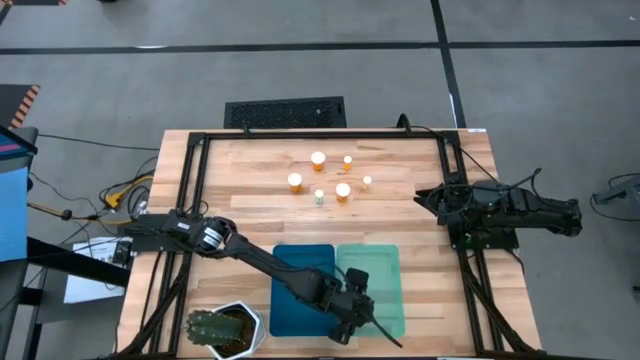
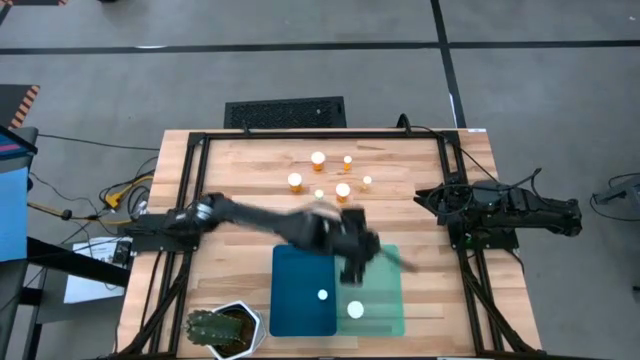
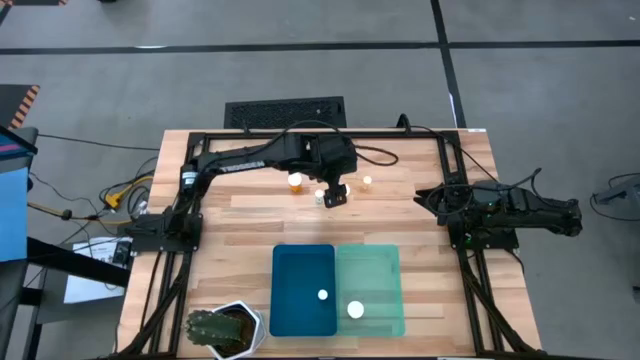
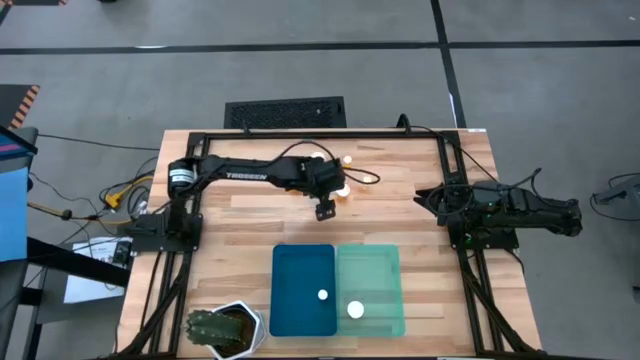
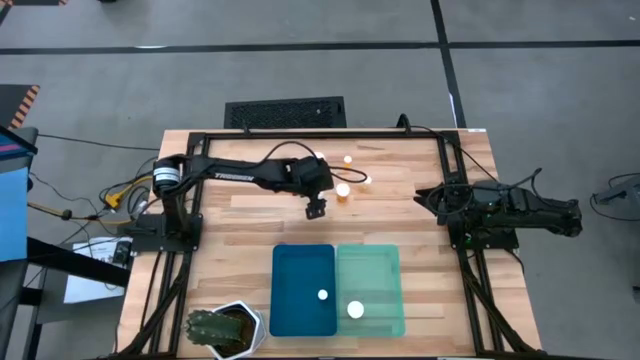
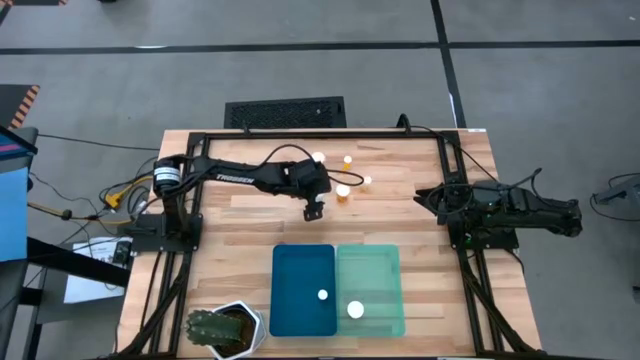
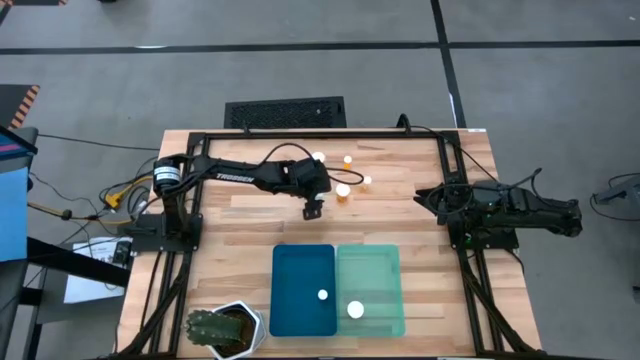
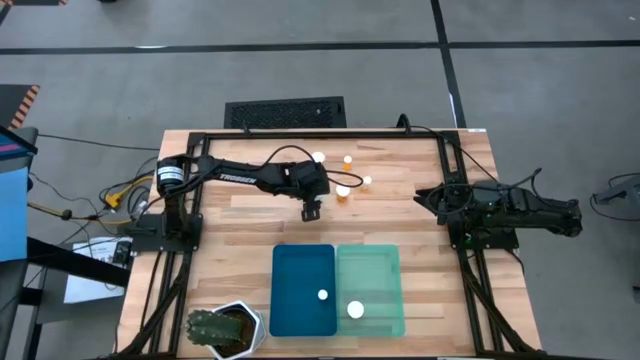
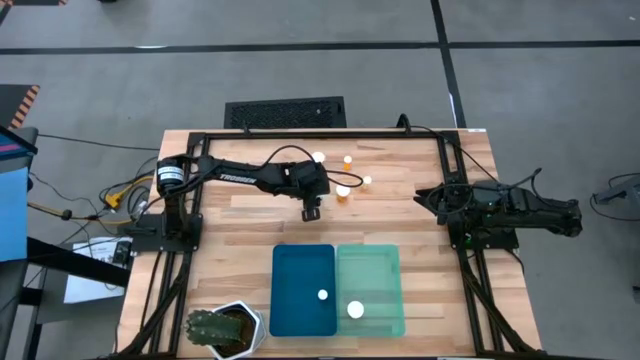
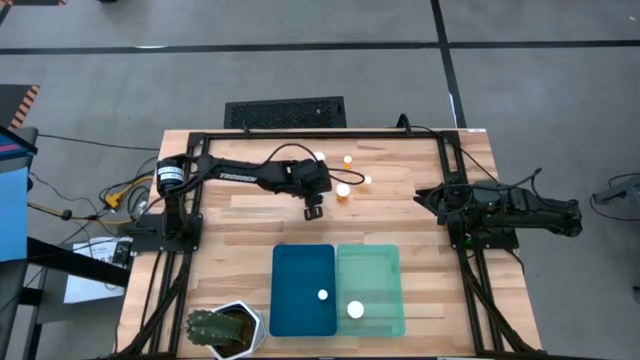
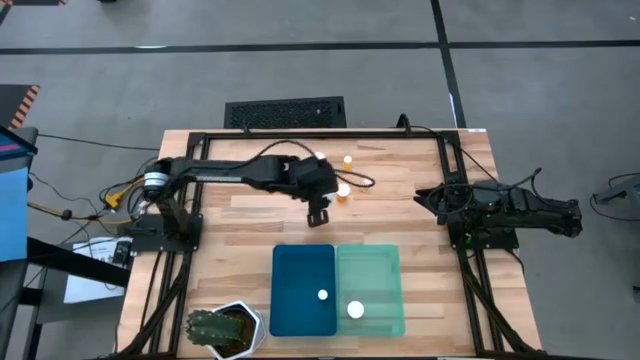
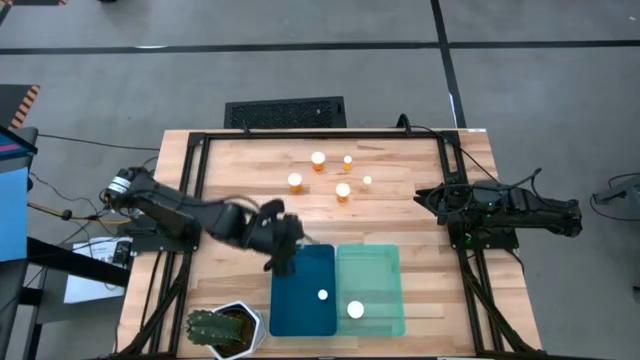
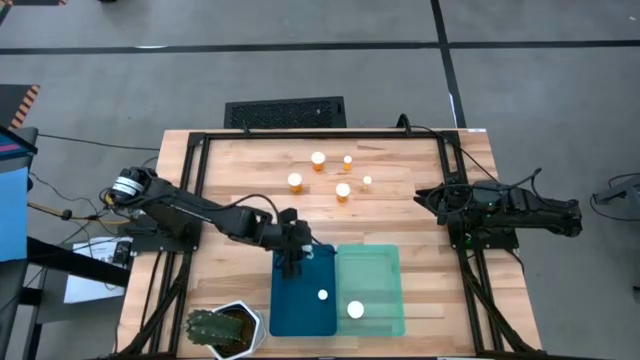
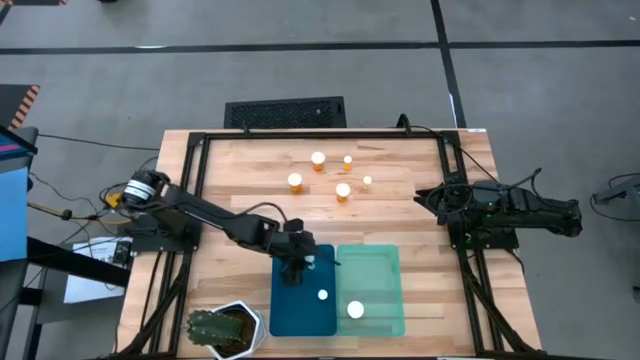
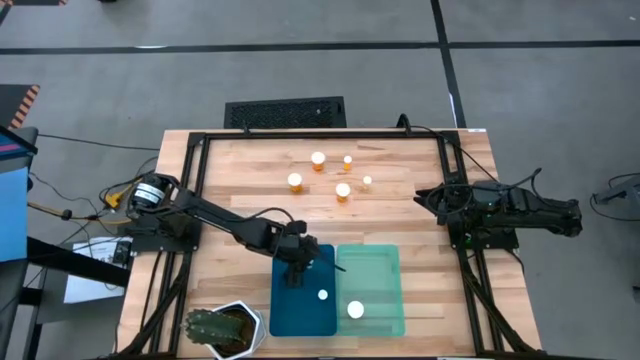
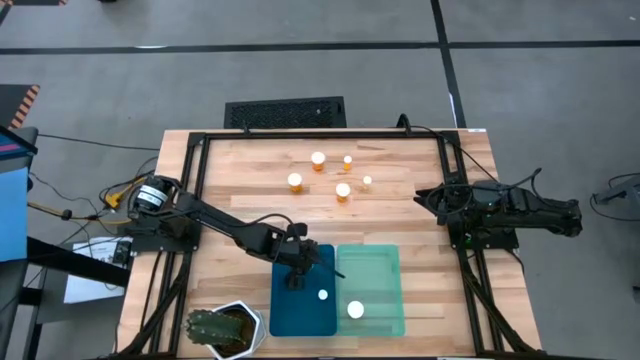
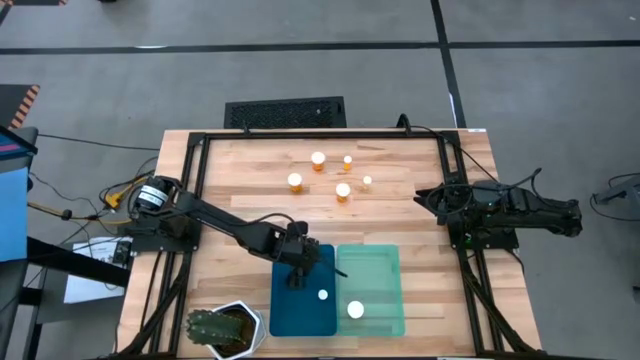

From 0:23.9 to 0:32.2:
Task: Pick and place medicine bottles into bin by pill shape (circle, oval)
Put the small green pill bottle into the blue bin

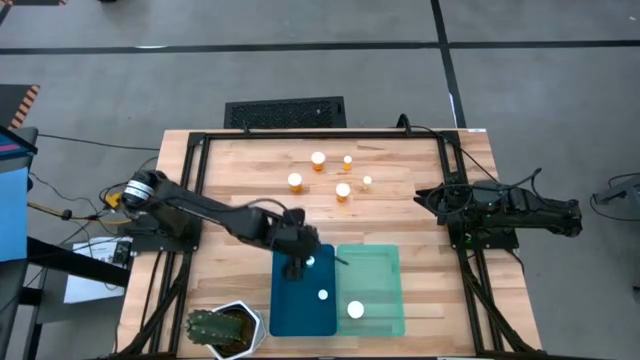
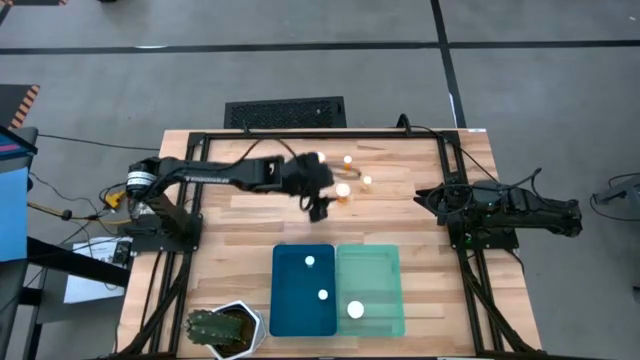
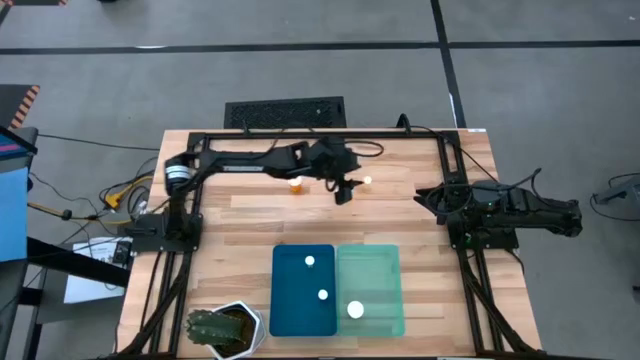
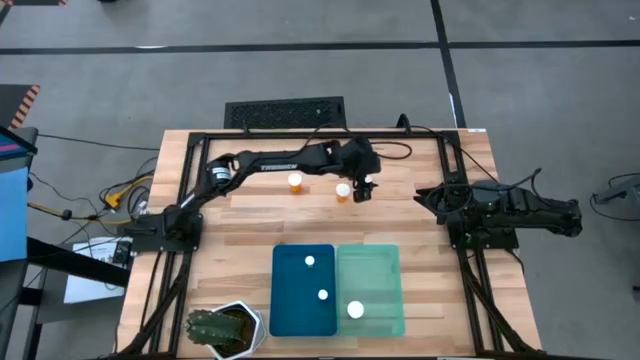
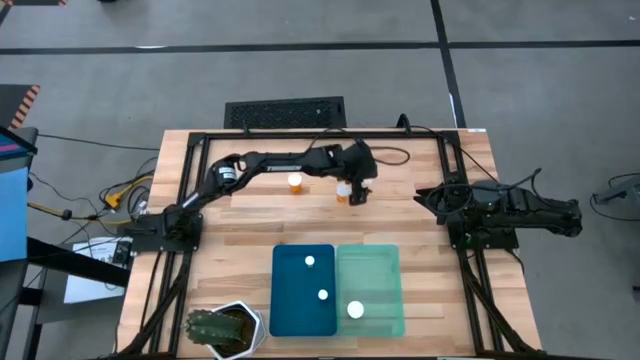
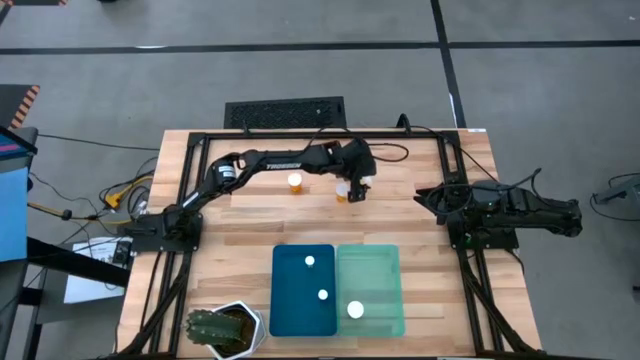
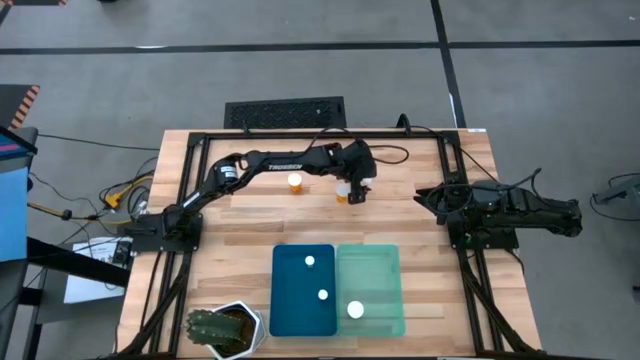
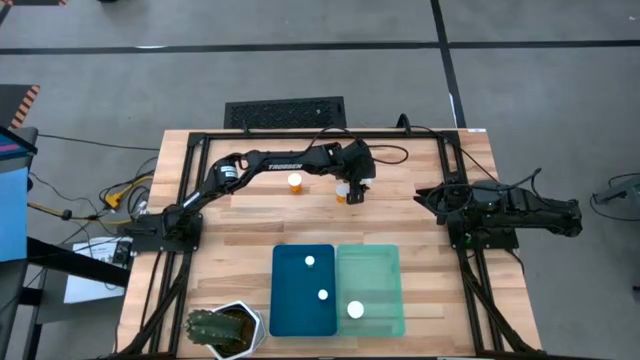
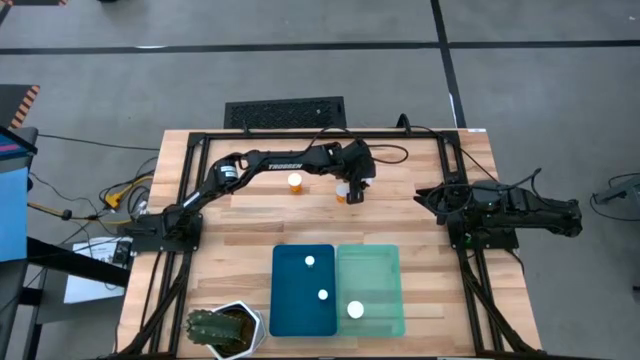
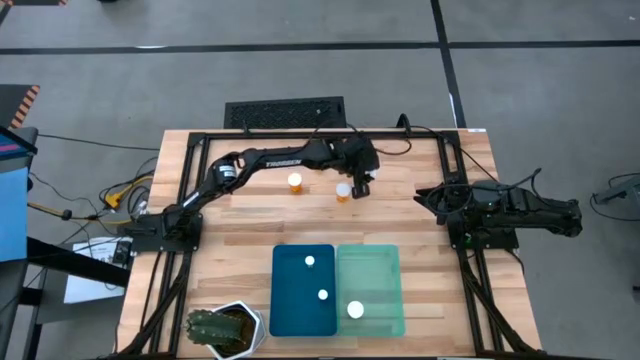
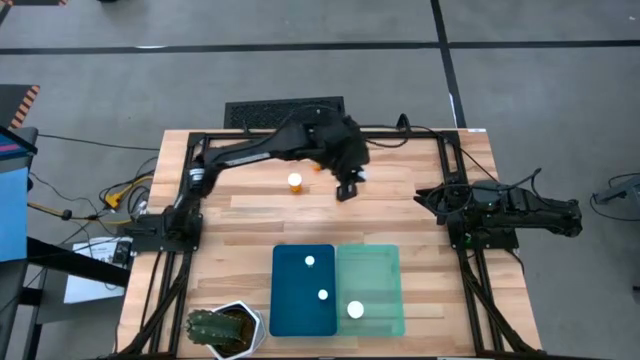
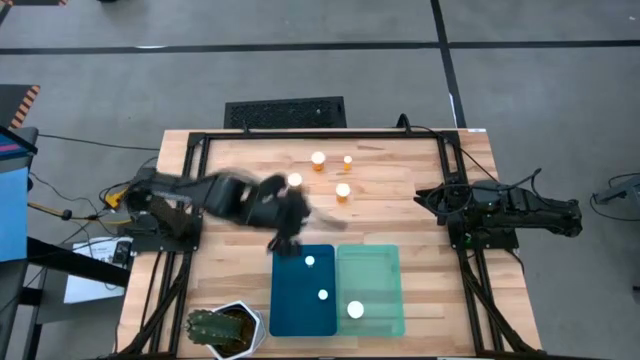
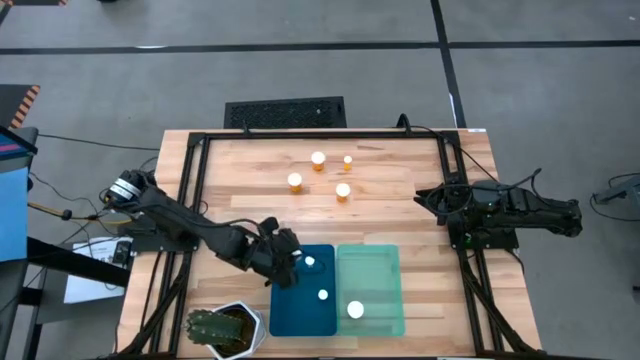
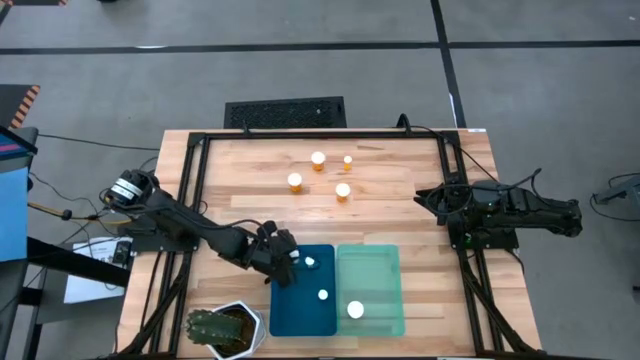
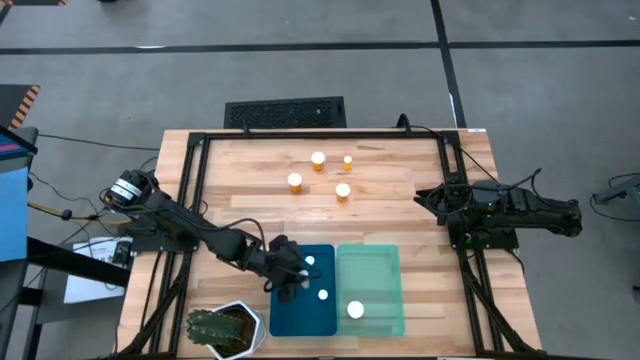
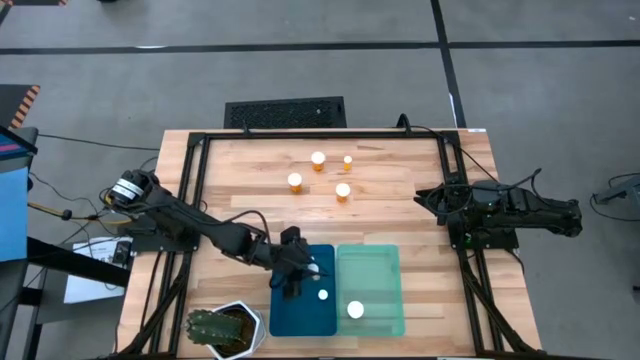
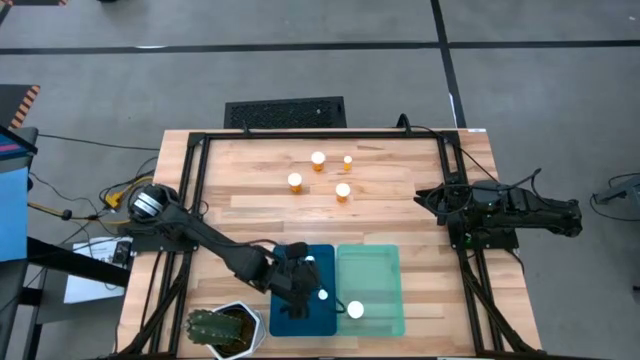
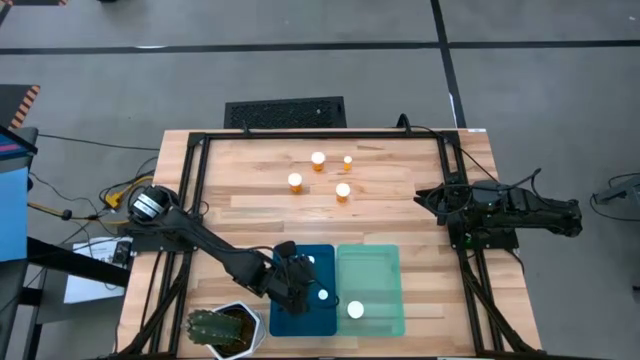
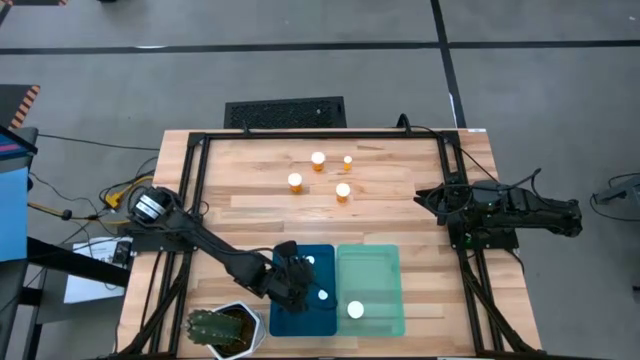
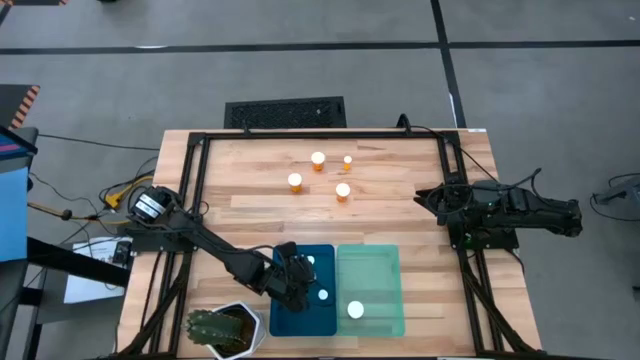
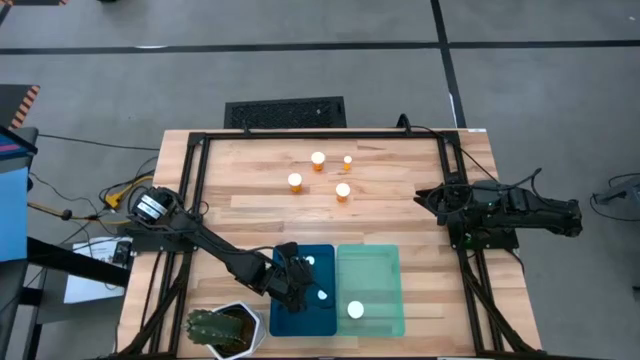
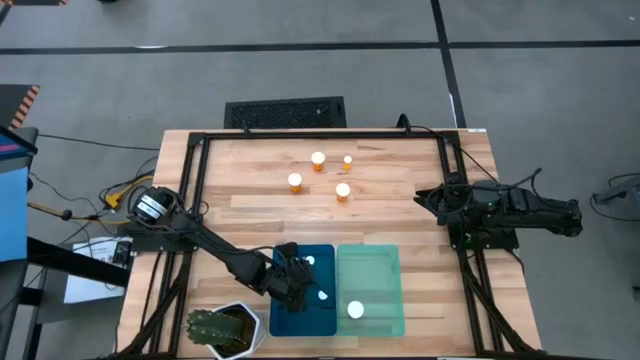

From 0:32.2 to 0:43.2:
Put the small yellow pill bottle into the blue bin

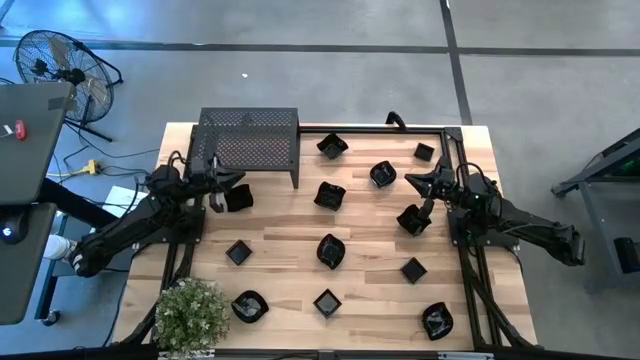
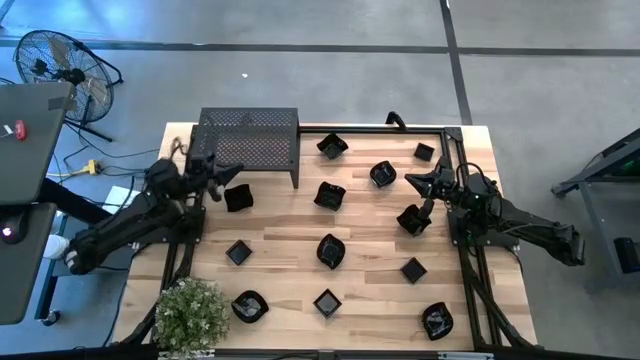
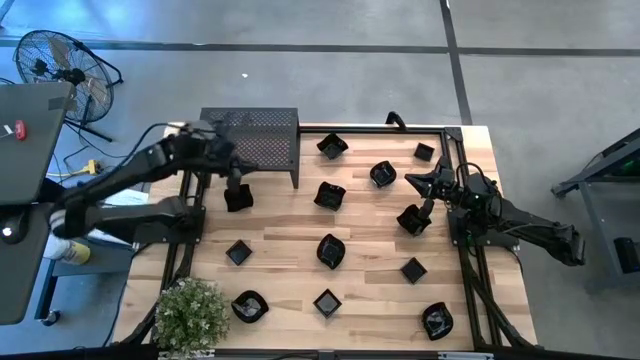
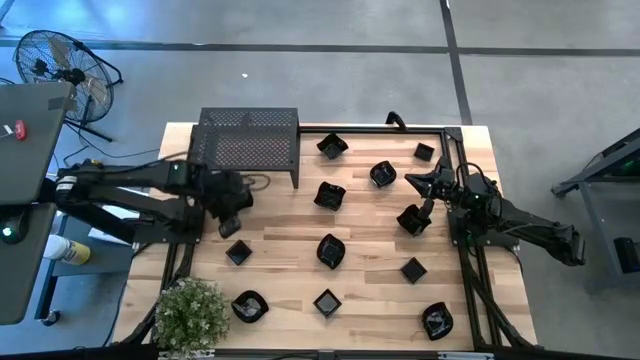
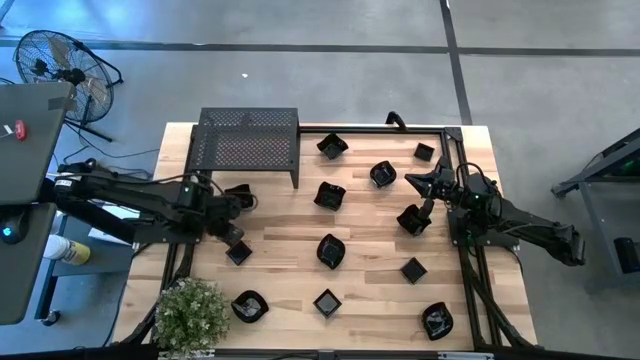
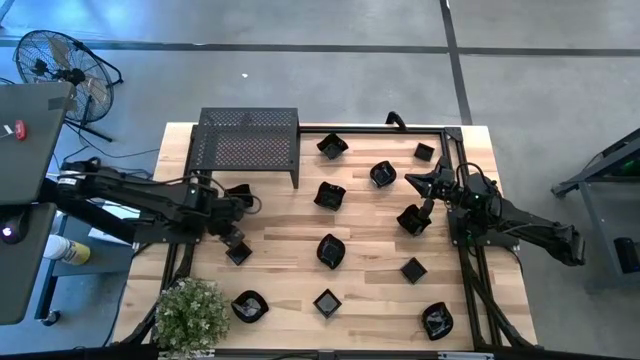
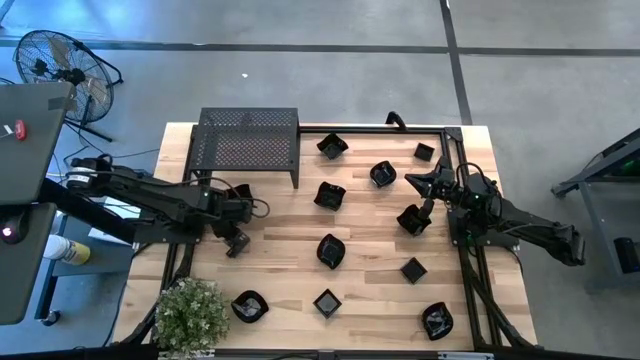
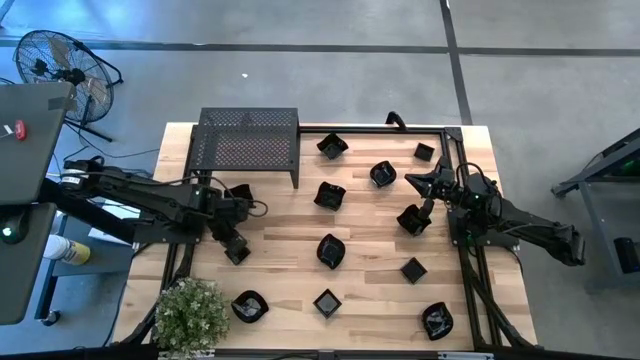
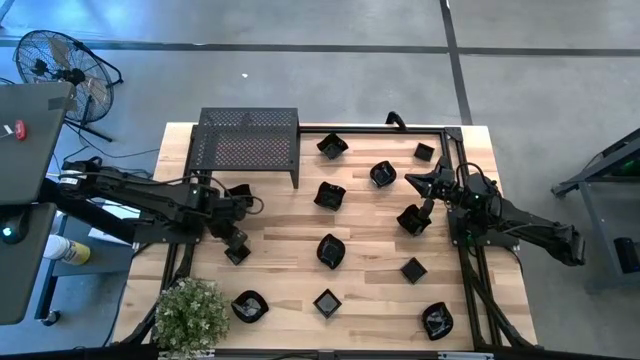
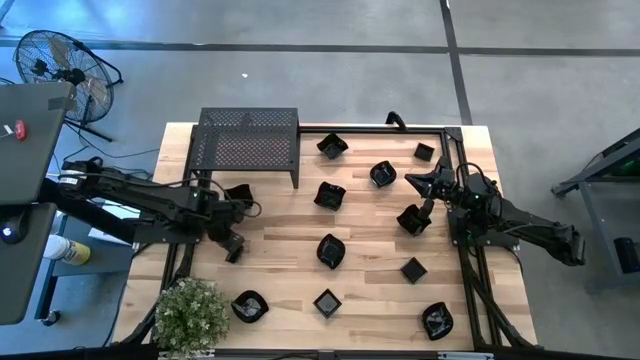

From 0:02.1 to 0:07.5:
Task: Pick & Place Mini shaped plates
Put the square plate on the shelf
